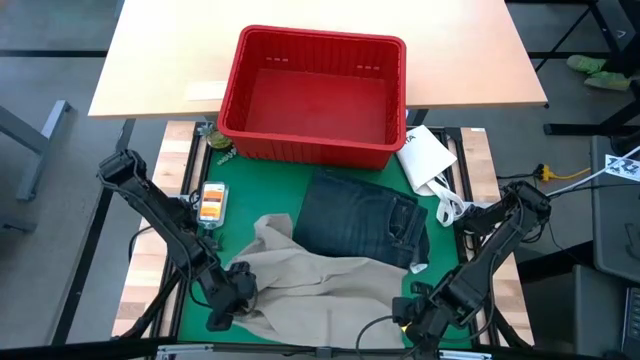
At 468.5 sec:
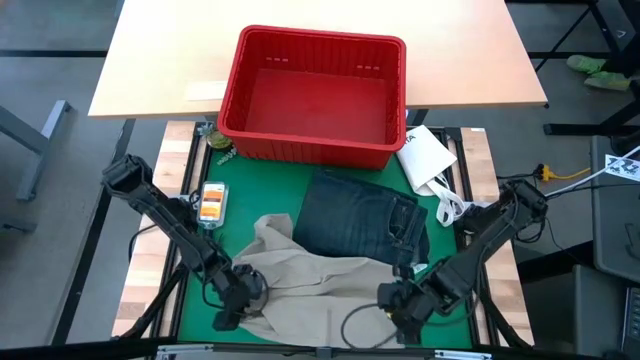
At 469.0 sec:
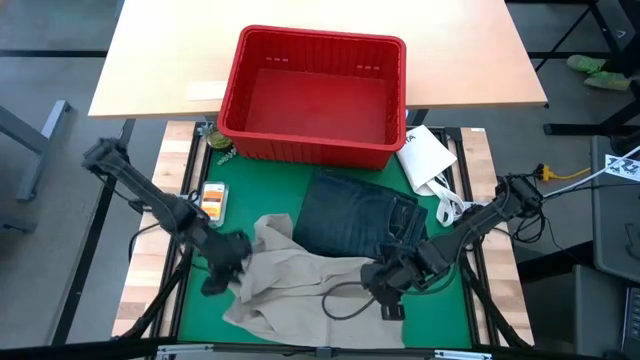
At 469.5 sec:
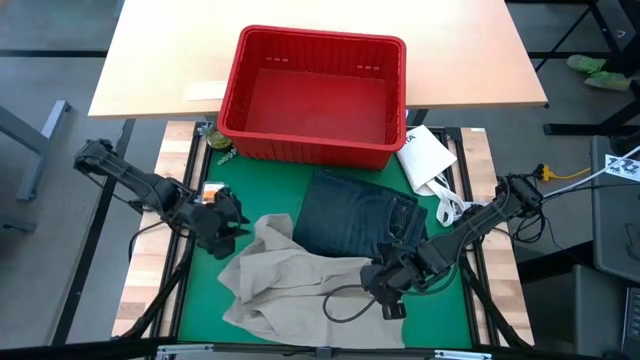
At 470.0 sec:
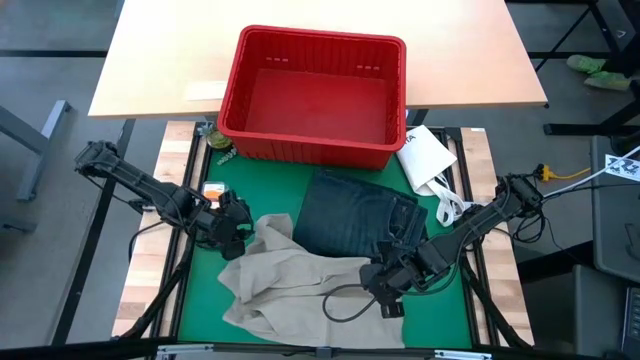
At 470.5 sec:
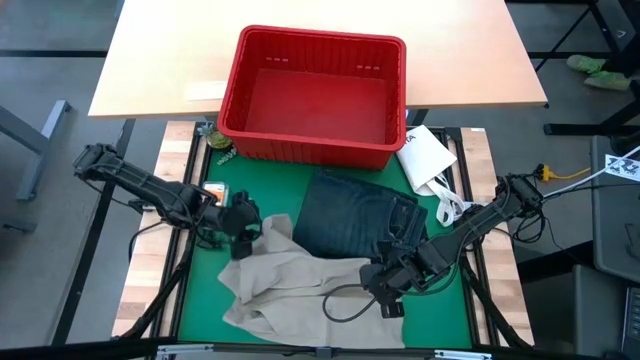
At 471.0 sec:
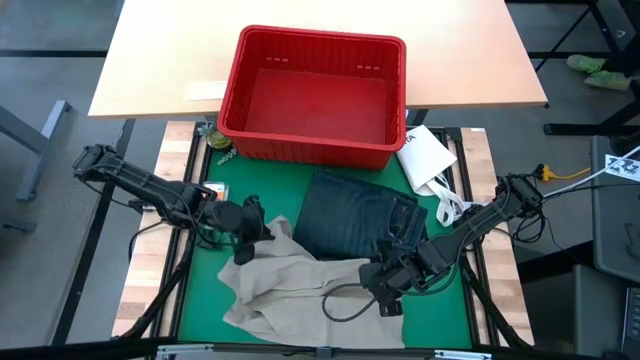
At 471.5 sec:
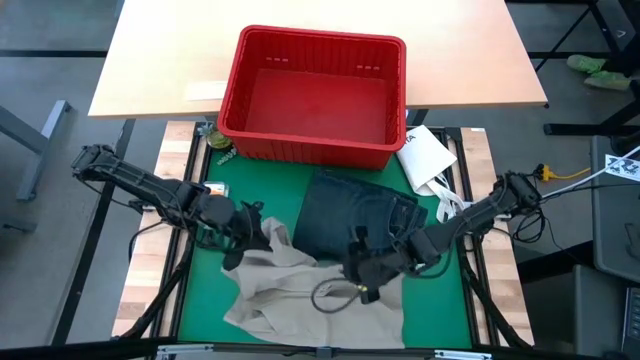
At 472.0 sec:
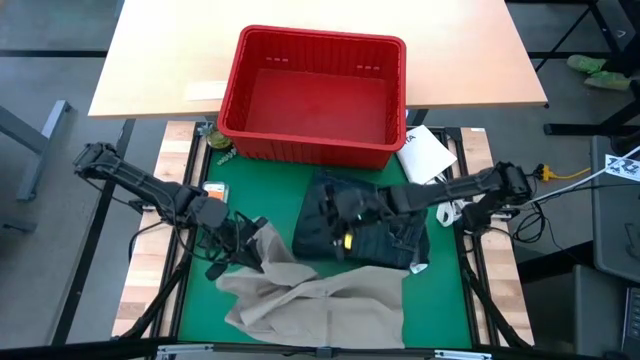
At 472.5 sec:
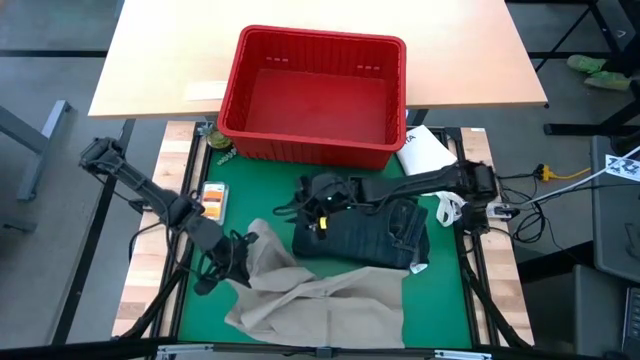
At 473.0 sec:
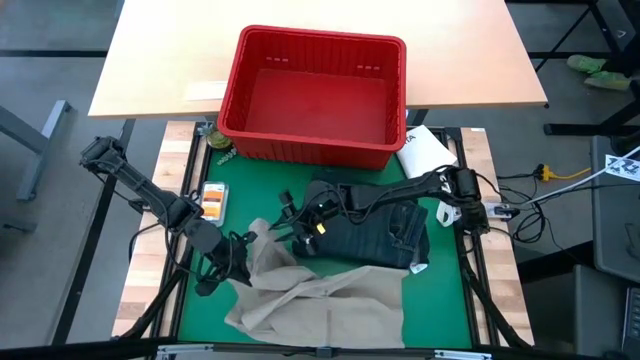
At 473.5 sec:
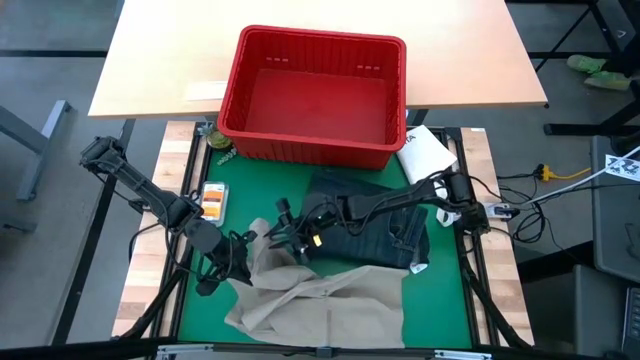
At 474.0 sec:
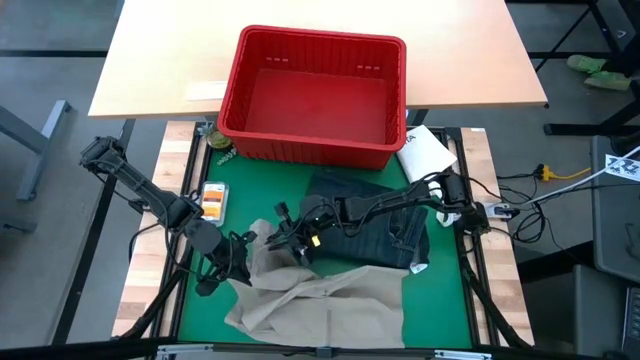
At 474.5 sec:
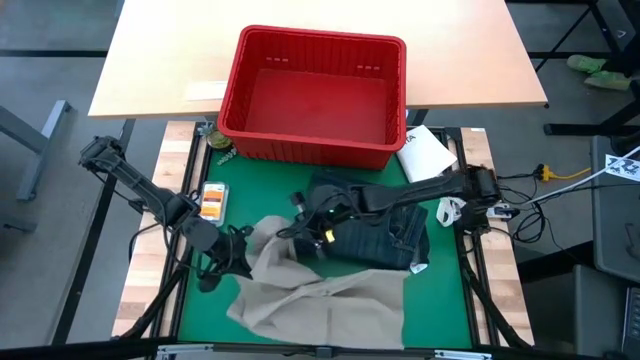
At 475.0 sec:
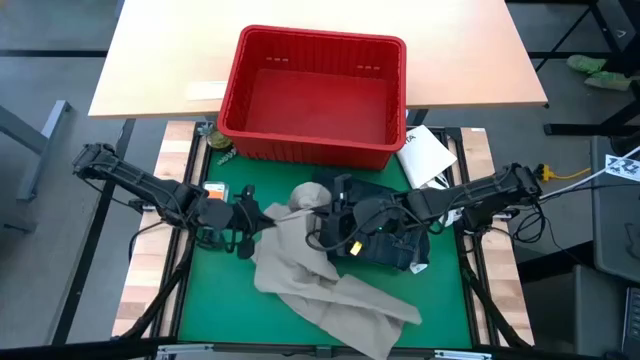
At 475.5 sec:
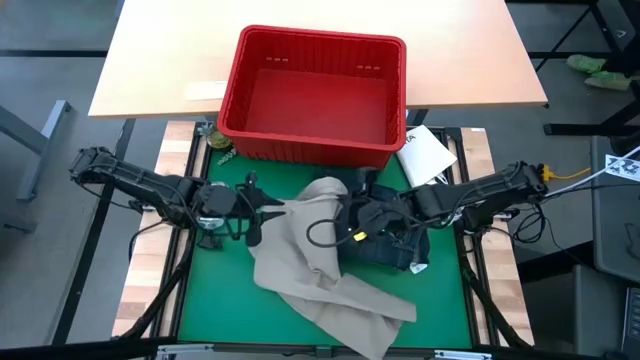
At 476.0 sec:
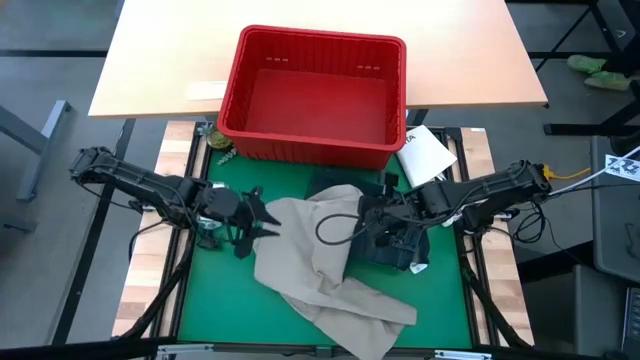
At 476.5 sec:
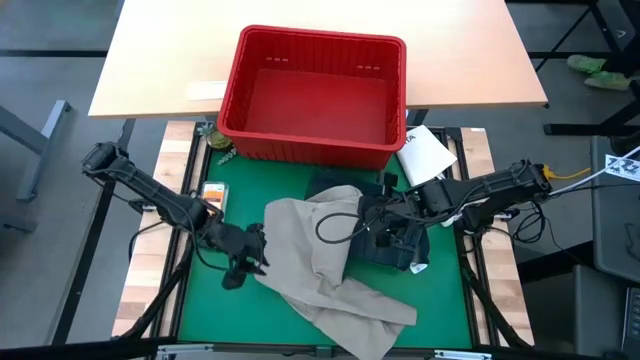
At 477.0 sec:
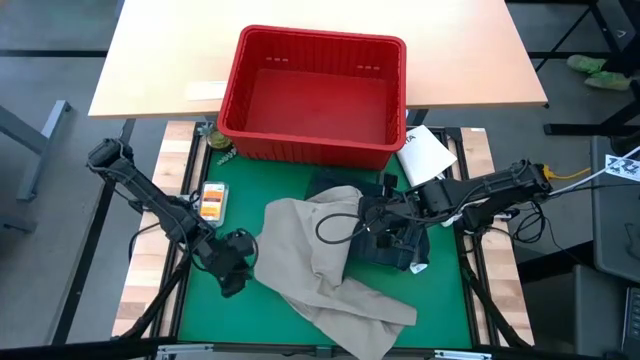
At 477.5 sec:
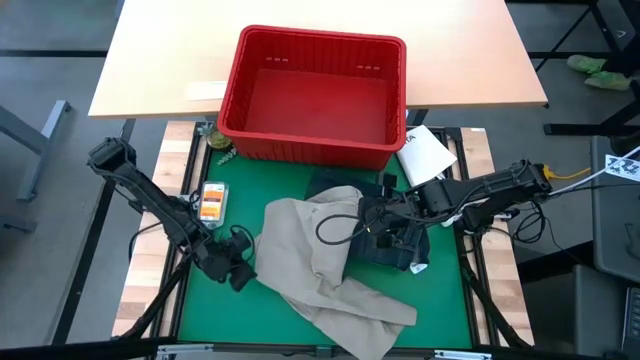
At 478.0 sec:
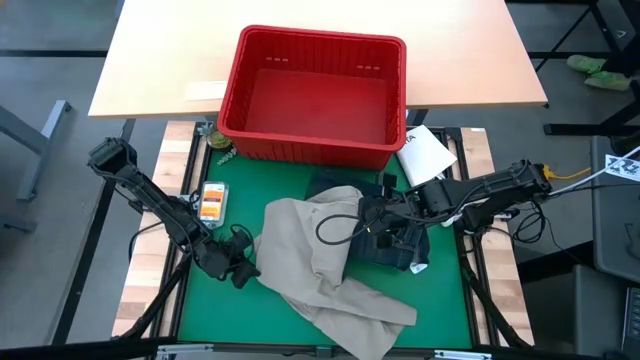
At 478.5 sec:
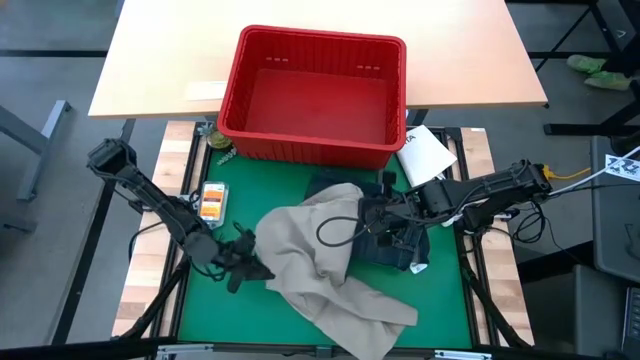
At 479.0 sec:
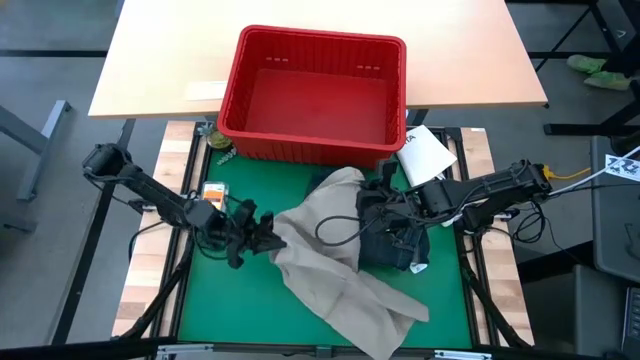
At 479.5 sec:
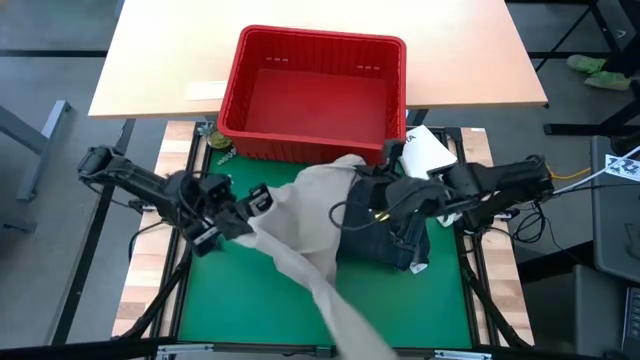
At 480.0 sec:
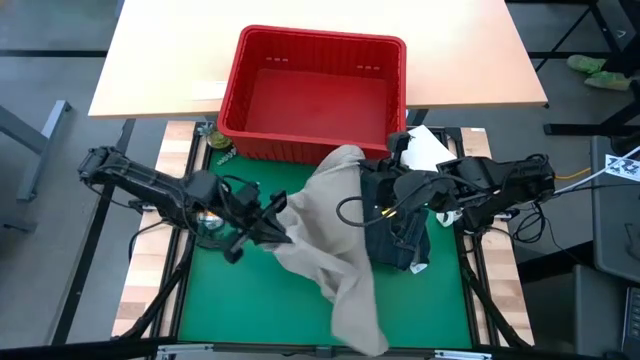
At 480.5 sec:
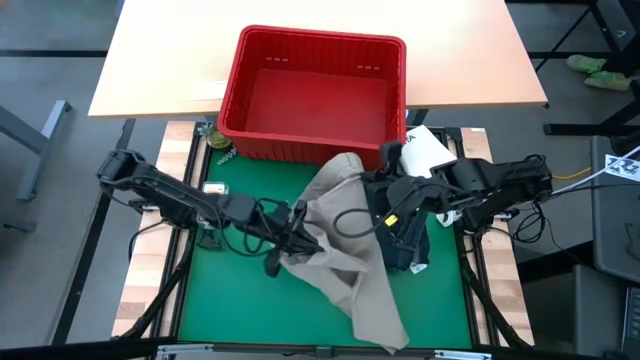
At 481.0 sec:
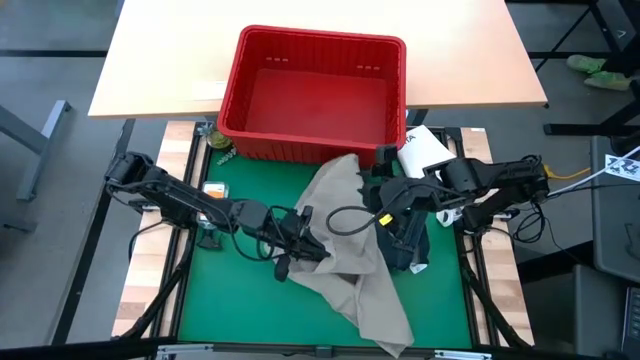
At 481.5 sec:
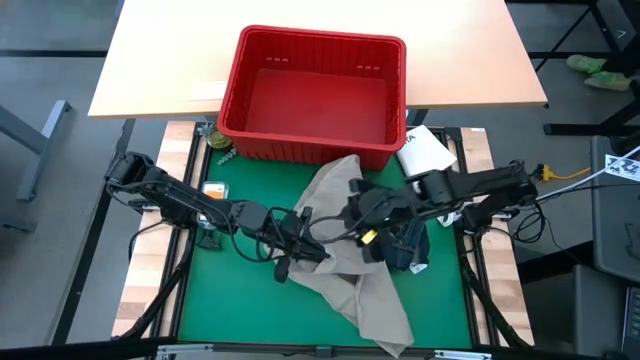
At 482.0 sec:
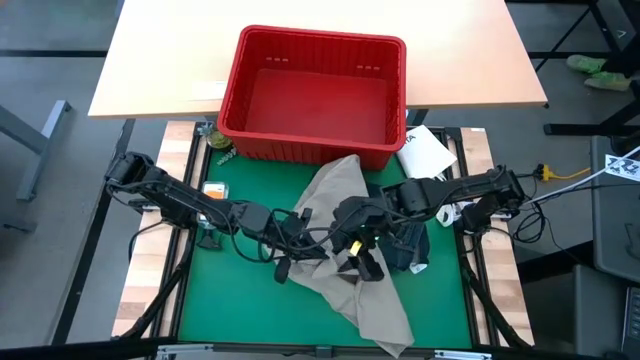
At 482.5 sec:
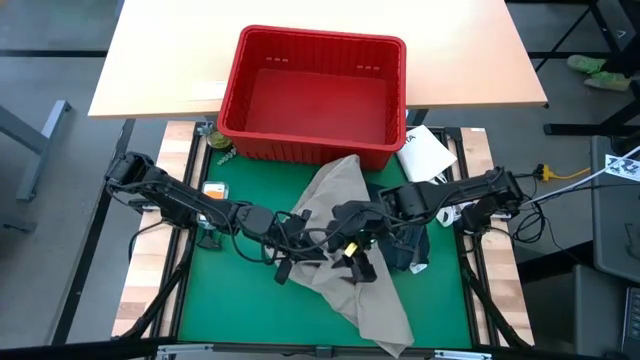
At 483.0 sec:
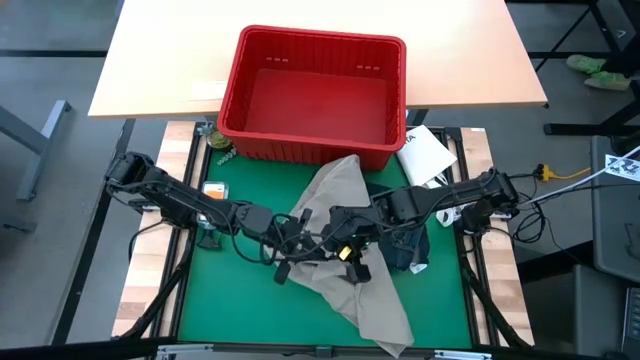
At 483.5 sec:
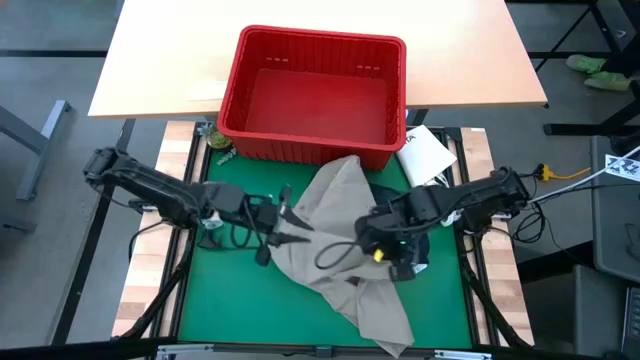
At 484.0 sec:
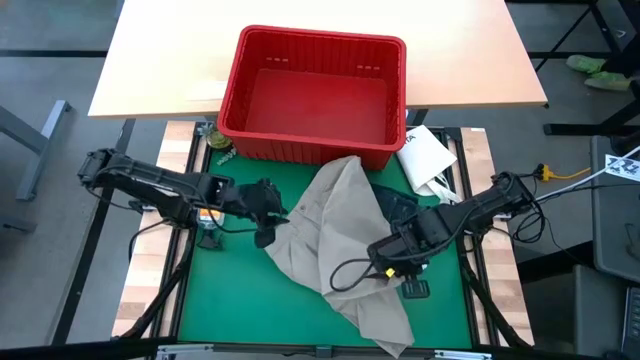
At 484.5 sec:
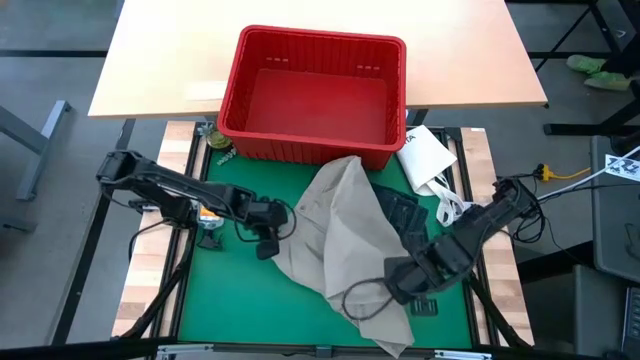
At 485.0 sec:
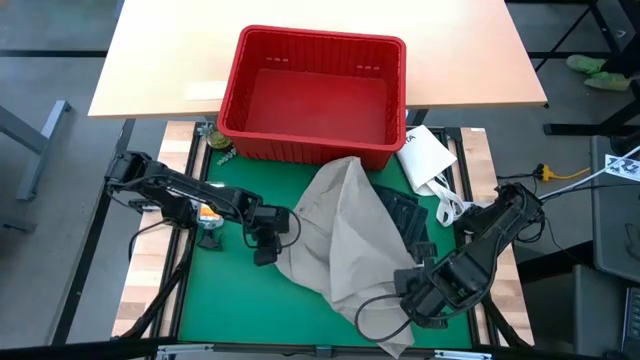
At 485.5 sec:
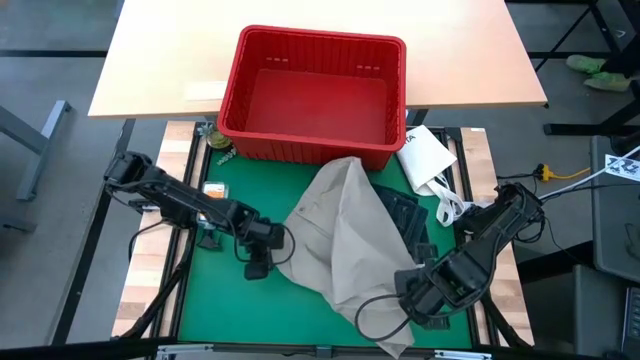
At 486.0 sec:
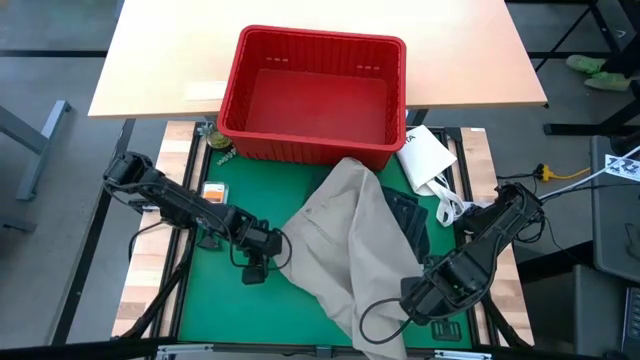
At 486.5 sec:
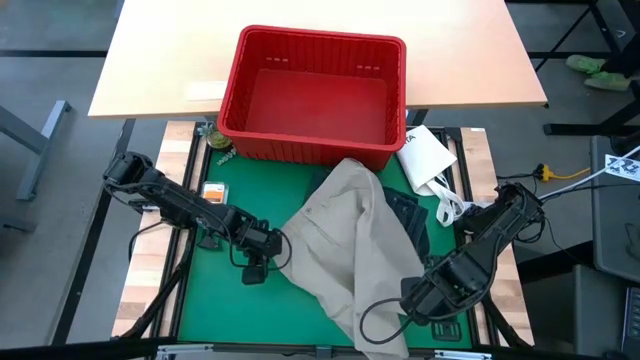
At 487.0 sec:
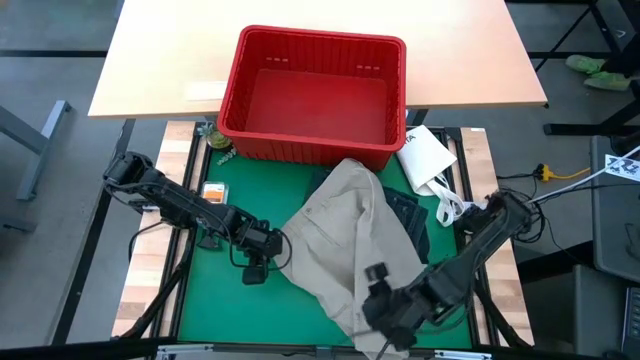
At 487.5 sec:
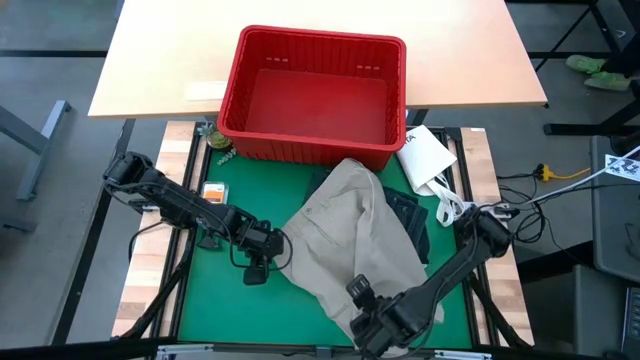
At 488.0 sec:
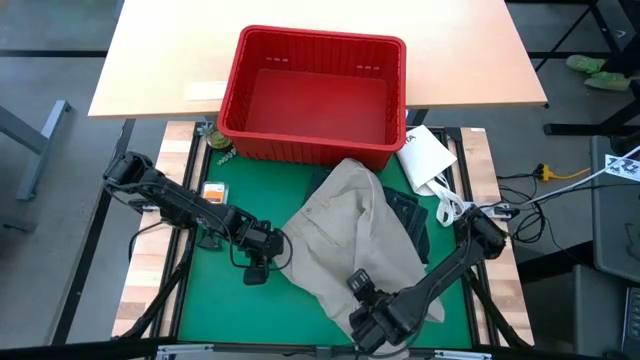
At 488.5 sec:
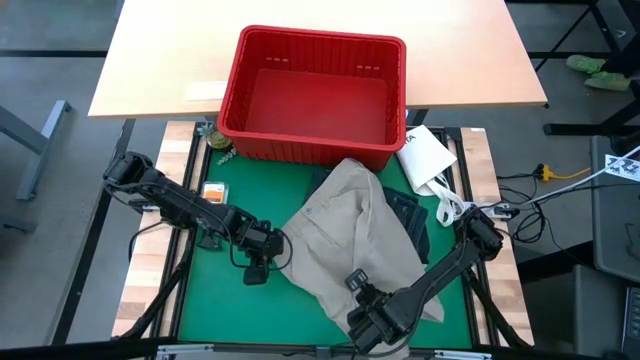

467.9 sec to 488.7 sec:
Task: Fold Laundry from Bin
Fold the gray shorts
